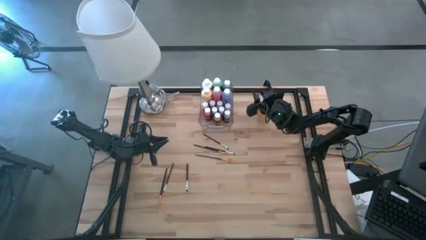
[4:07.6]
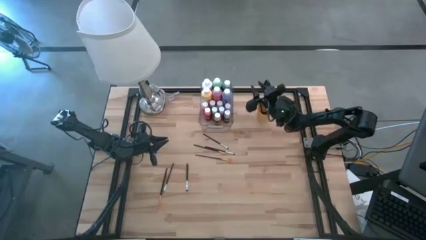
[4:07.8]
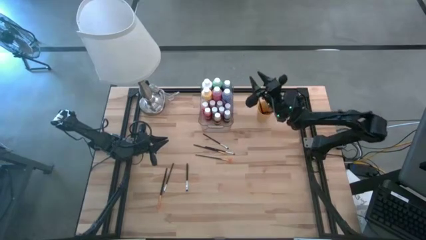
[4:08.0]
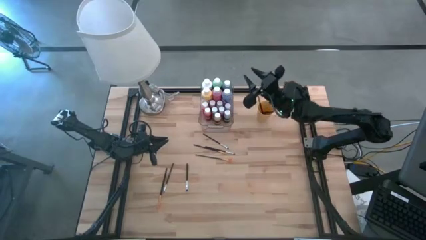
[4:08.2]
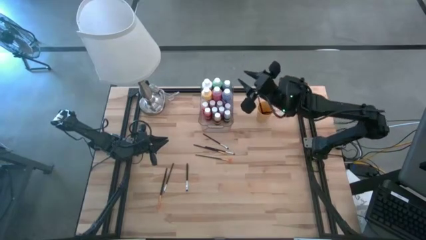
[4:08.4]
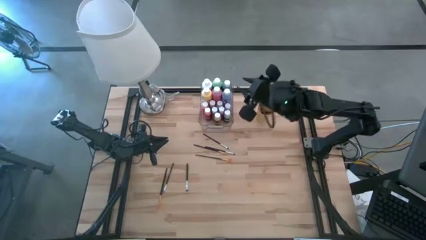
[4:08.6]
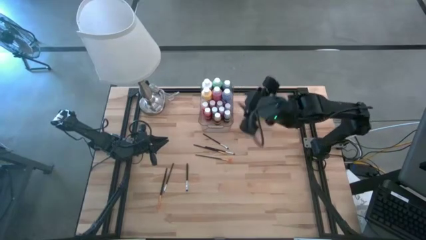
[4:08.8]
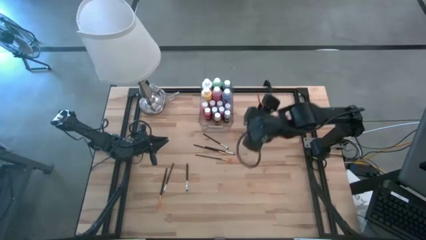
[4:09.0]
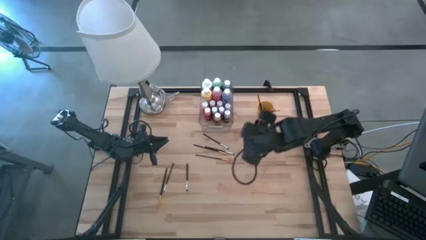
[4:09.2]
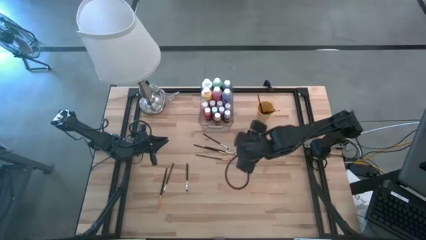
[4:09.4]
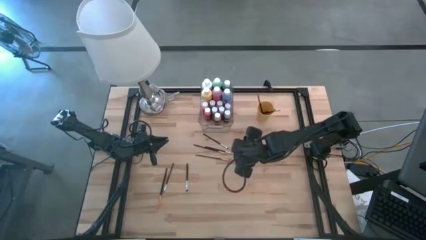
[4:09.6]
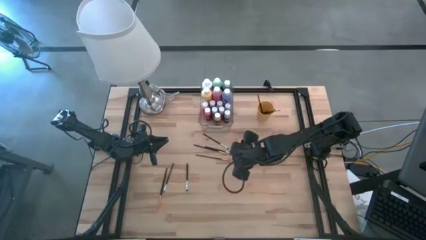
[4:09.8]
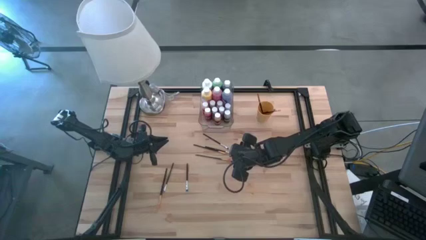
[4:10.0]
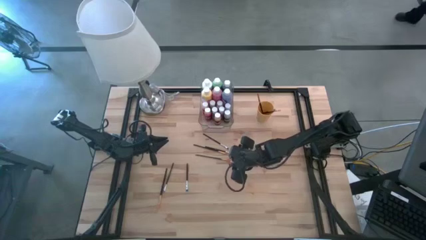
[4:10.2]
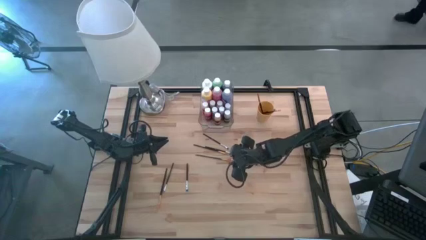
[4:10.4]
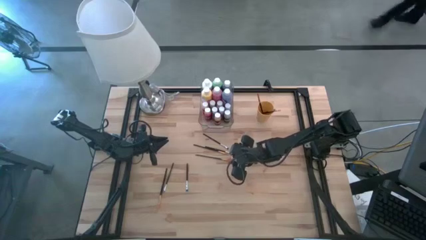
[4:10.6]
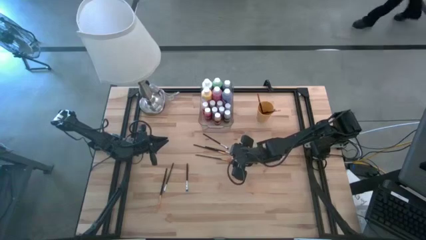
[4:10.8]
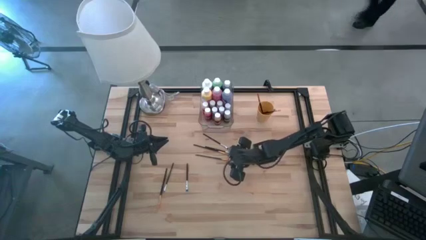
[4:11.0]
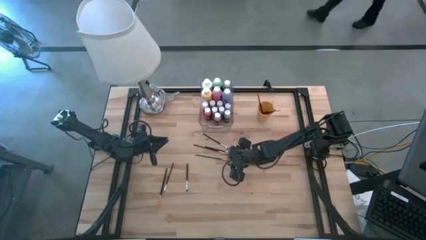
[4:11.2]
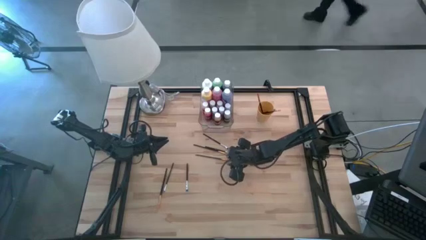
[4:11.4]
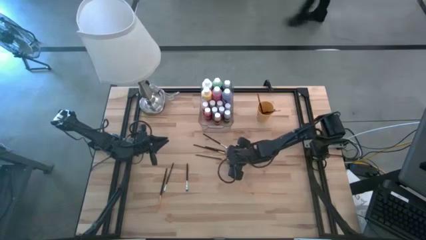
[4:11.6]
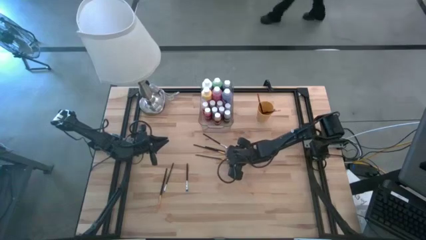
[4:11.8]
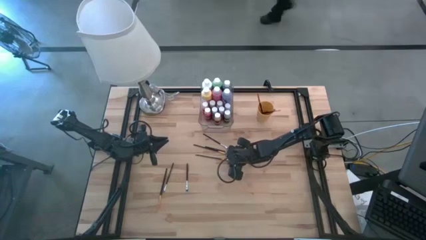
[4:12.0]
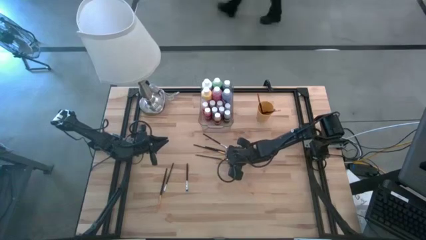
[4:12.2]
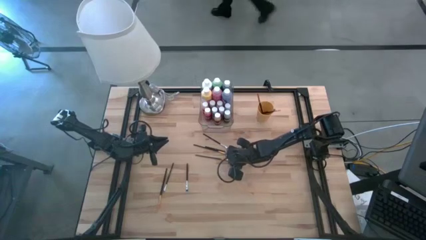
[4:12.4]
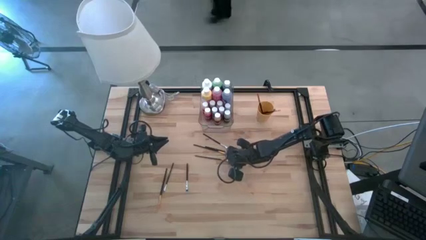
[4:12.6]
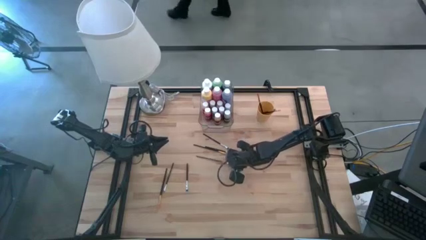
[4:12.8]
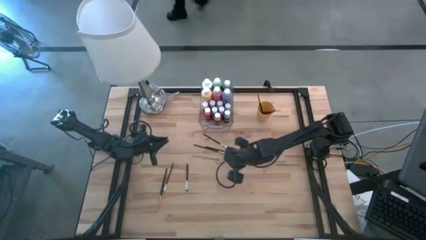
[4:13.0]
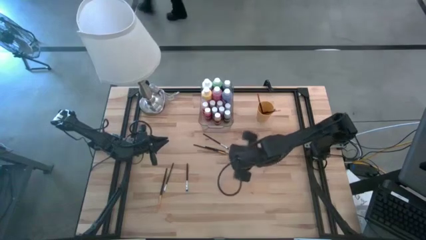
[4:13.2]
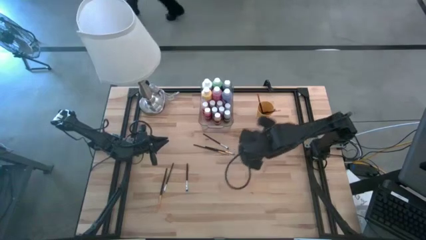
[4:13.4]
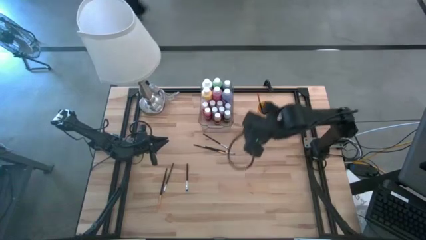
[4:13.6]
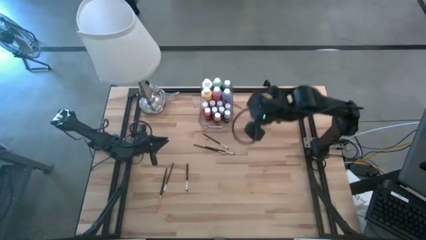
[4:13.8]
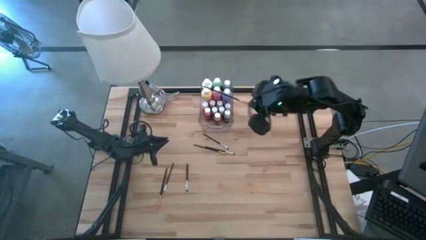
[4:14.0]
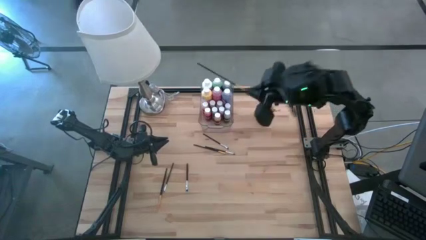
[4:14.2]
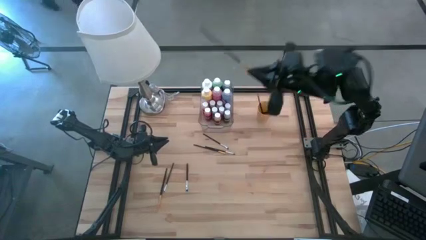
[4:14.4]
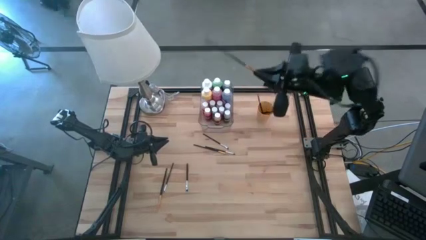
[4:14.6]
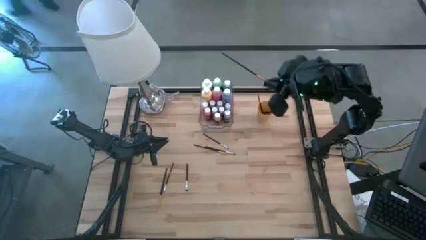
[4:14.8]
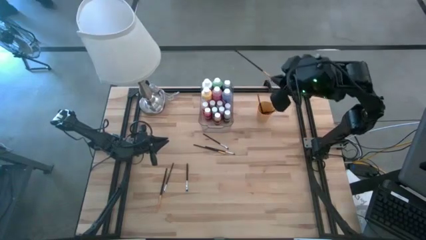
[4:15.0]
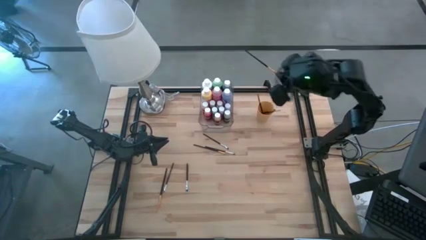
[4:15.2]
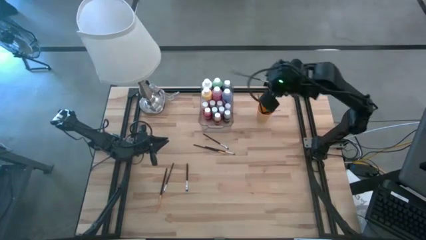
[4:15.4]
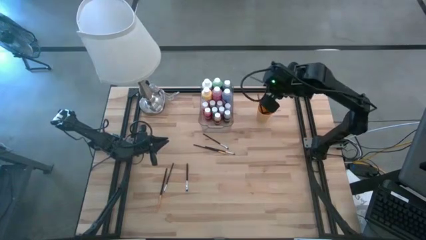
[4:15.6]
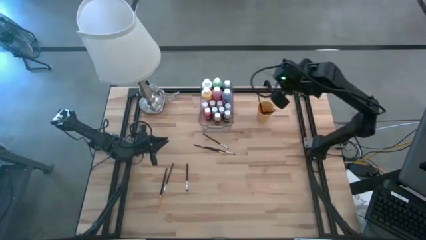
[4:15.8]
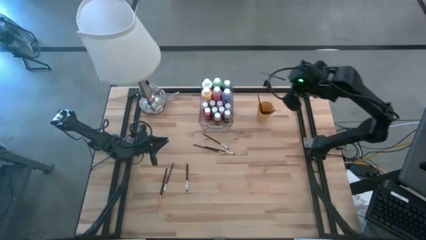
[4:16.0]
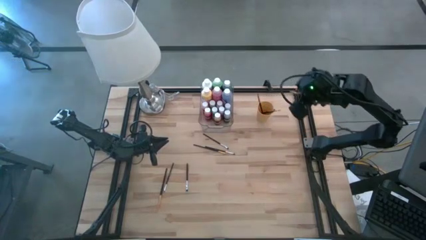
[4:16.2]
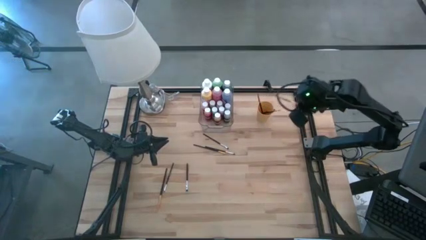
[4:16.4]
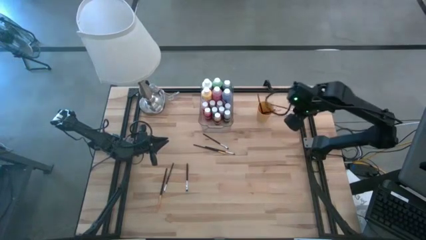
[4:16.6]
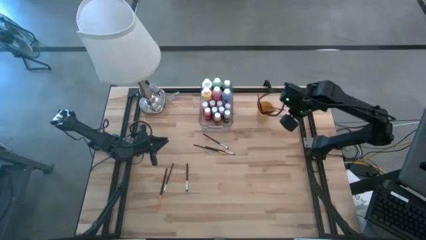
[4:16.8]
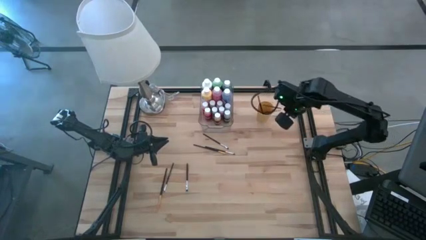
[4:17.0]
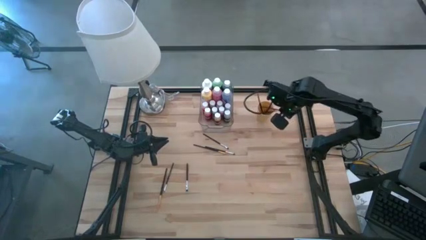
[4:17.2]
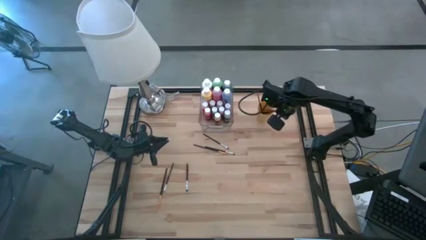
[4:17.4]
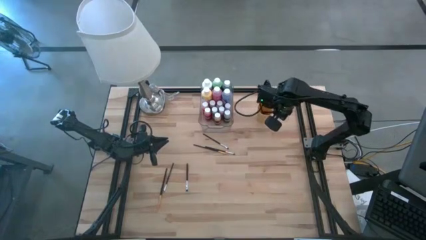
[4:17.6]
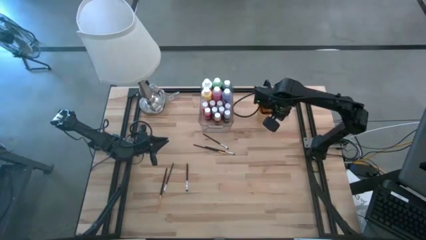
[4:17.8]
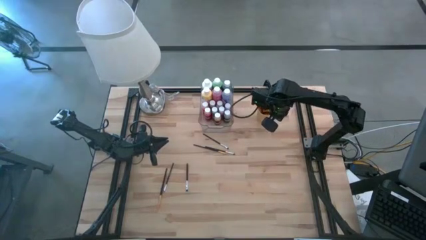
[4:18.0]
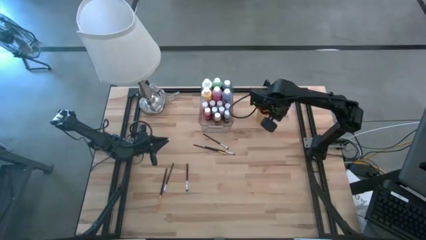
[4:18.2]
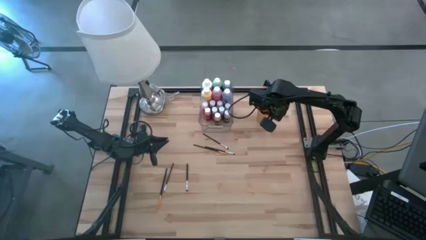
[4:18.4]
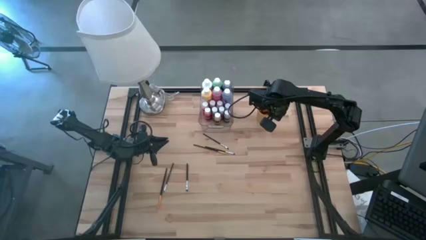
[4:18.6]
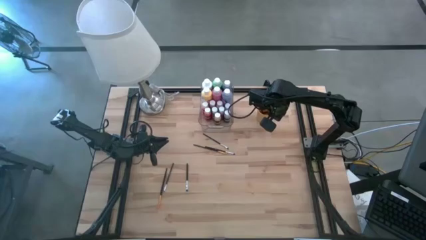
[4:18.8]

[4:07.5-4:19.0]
Task: Pick & Place Paint Supplies
Put the gold paint brush into the cup

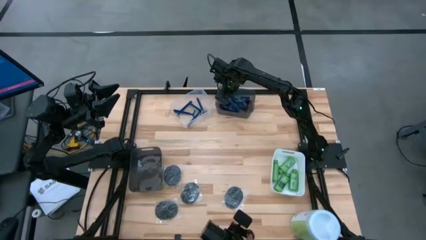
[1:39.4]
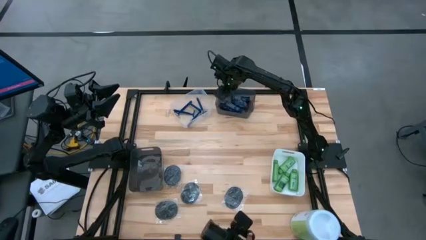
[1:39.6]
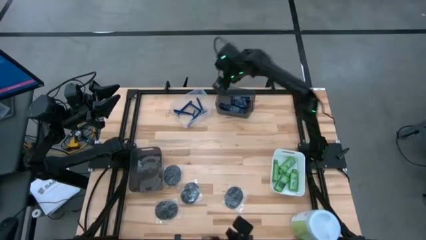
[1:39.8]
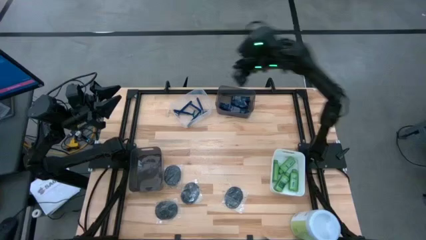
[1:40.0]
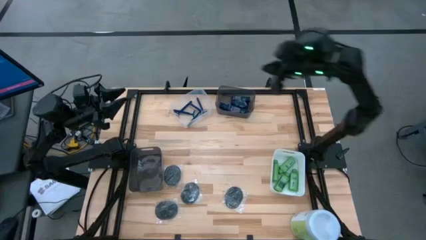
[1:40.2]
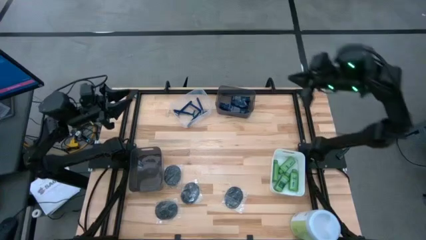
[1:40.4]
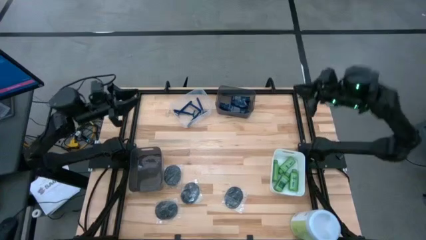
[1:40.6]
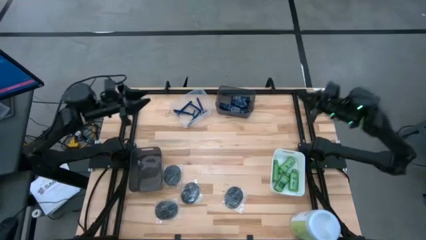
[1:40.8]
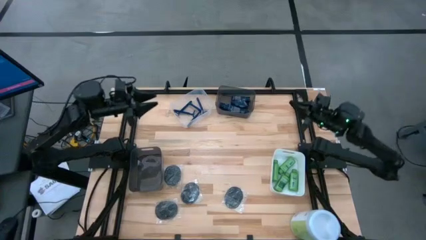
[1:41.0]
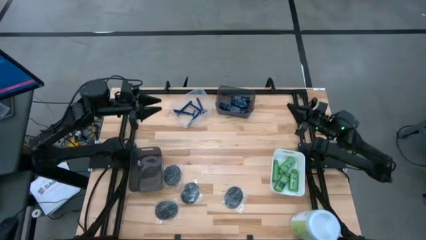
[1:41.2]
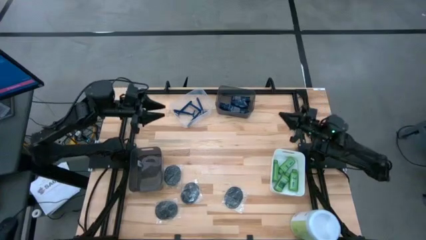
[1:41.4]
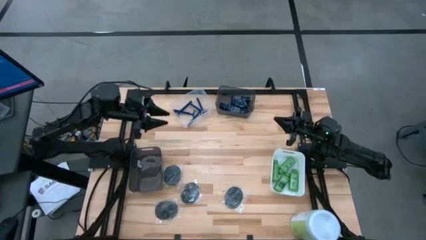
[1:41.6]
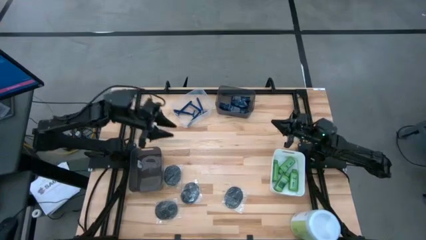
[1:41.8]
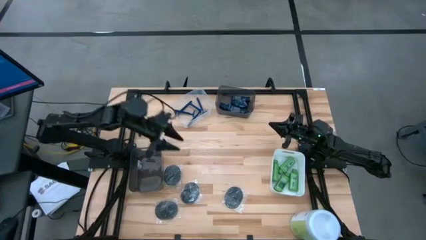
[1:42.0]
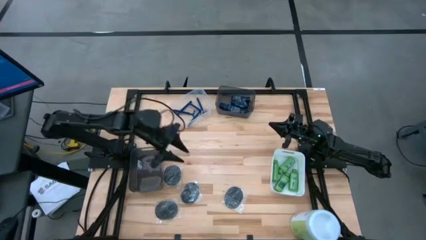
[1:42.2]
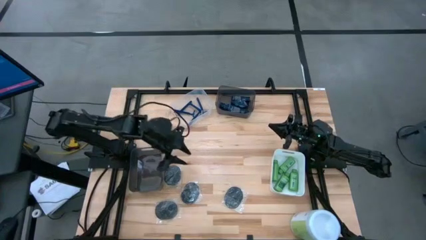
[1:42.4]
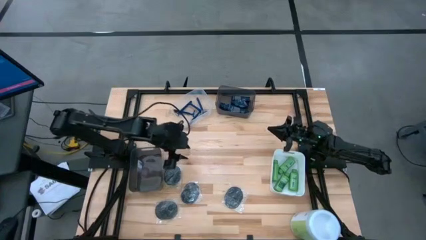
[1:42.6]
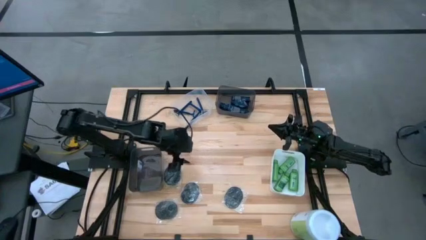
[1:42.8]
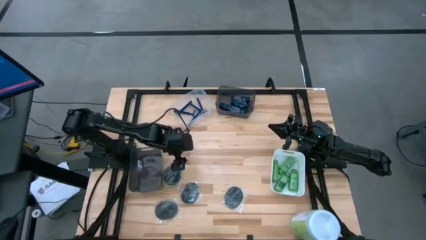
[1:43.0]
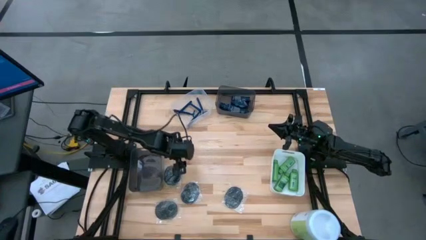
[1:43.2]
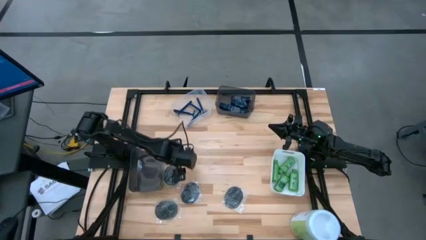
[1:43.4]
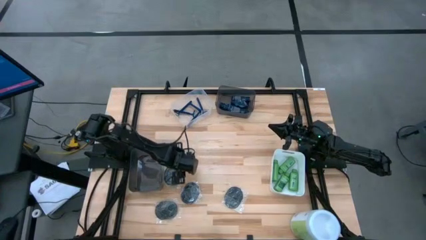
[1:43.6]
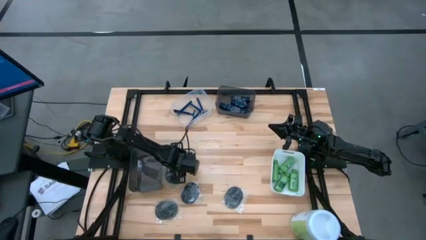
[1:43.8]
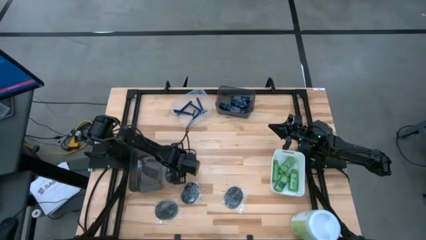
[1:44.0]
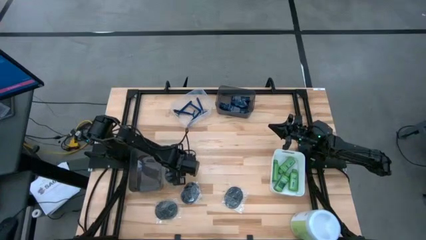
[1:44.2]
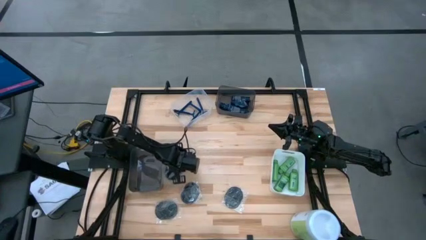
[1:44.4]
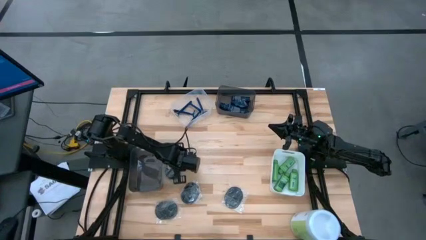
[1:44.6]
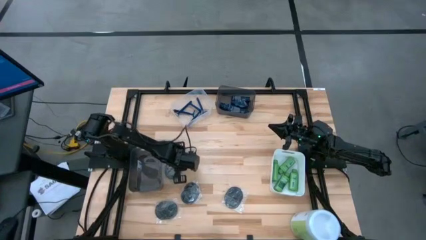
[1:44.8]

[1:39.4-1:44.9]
Task: Pick & Place Travel size toiletries
Put the black hairbrush into the bottom black bin
